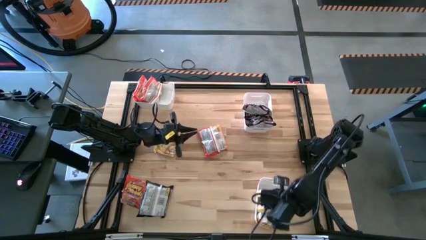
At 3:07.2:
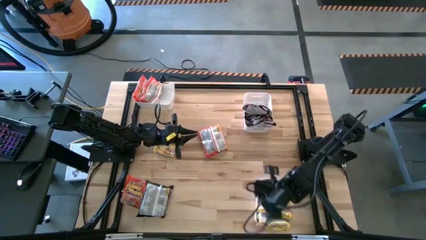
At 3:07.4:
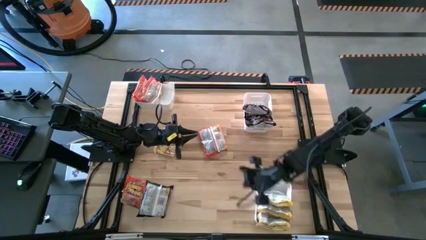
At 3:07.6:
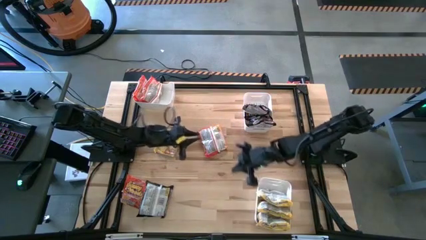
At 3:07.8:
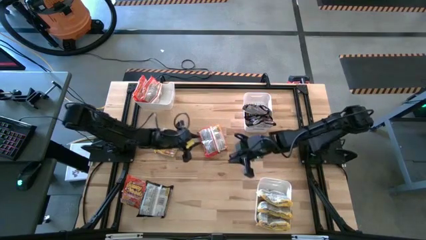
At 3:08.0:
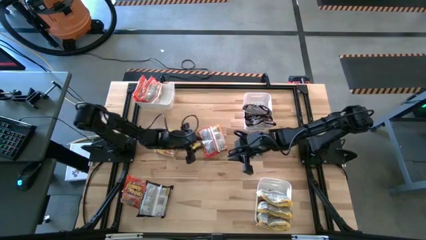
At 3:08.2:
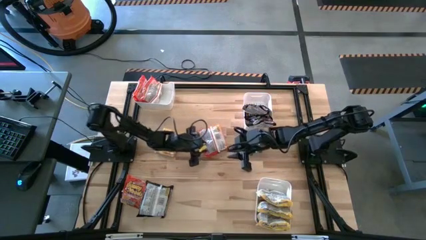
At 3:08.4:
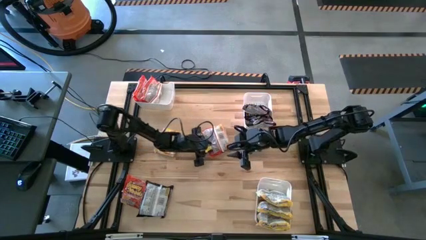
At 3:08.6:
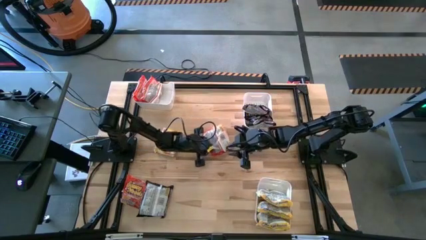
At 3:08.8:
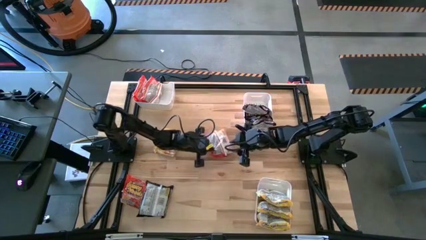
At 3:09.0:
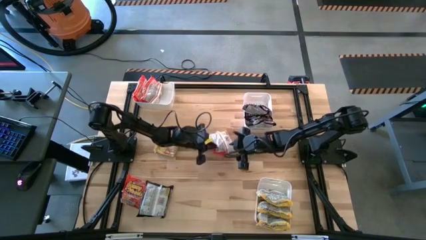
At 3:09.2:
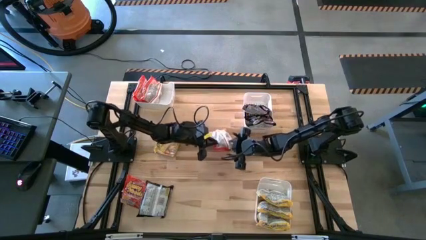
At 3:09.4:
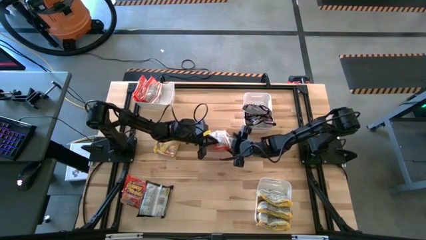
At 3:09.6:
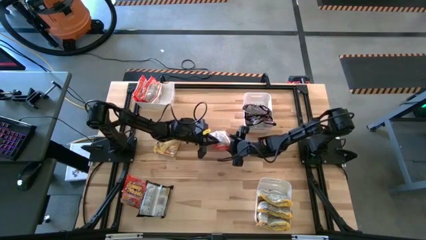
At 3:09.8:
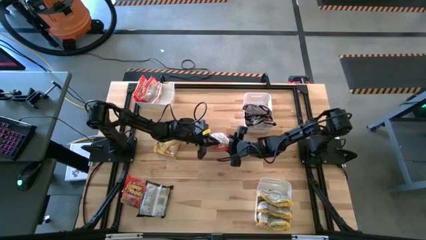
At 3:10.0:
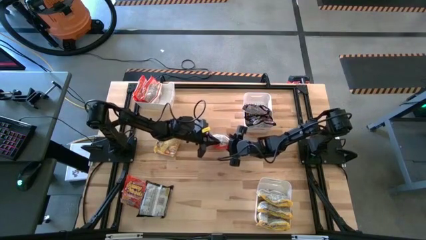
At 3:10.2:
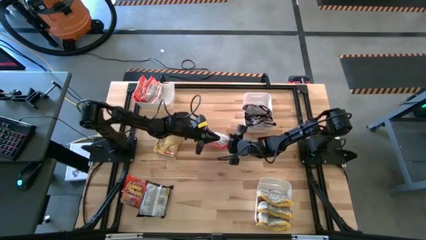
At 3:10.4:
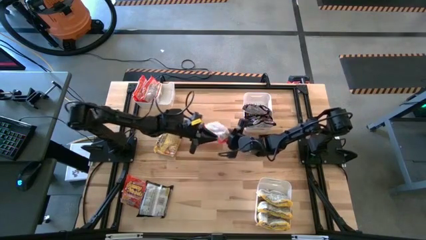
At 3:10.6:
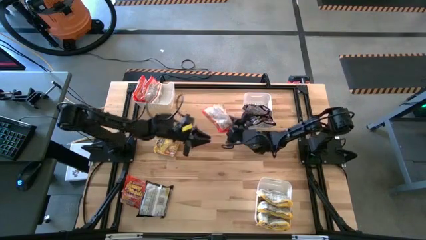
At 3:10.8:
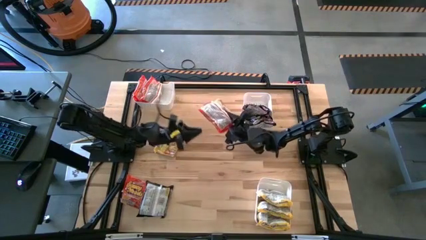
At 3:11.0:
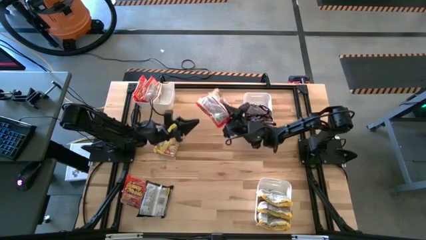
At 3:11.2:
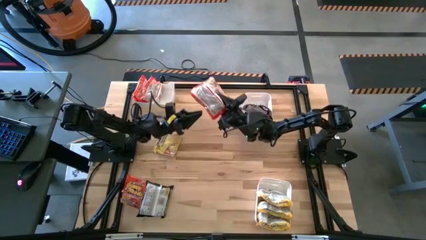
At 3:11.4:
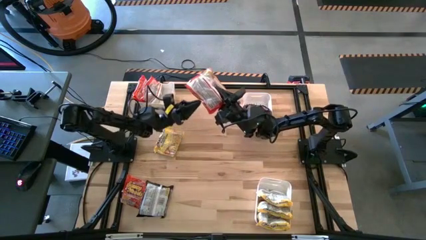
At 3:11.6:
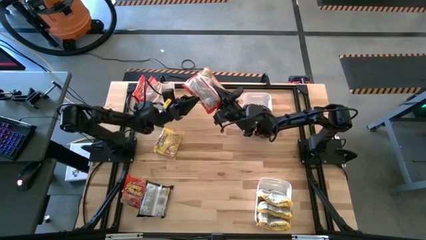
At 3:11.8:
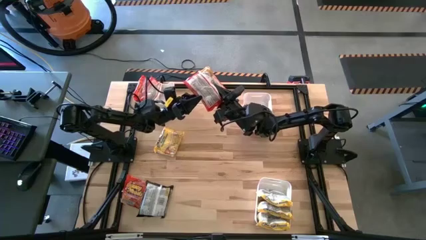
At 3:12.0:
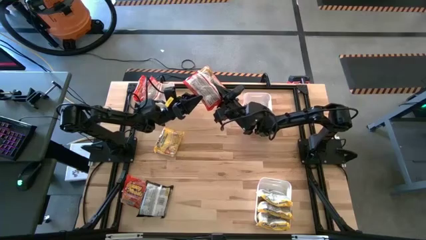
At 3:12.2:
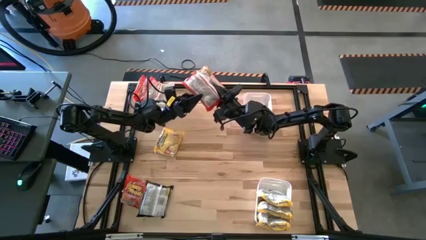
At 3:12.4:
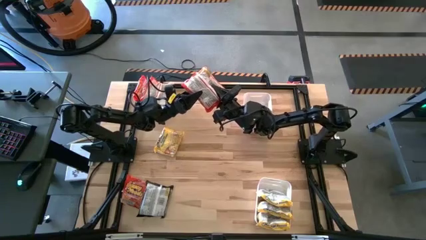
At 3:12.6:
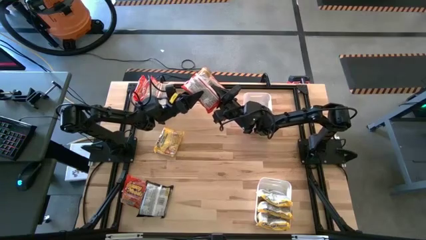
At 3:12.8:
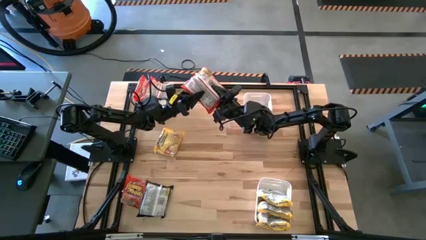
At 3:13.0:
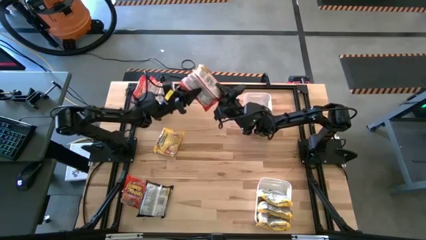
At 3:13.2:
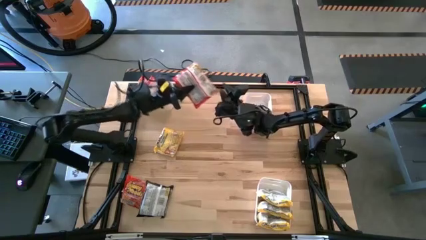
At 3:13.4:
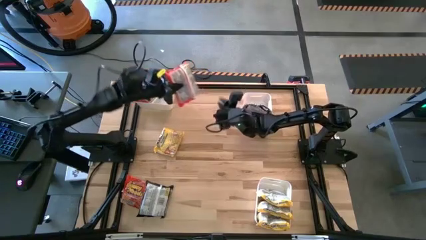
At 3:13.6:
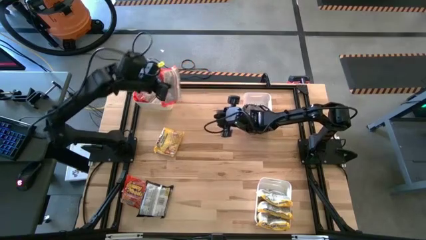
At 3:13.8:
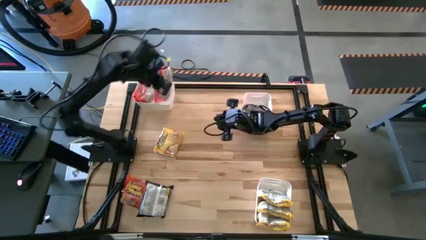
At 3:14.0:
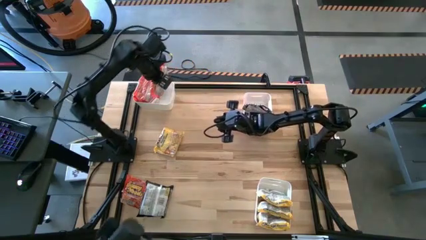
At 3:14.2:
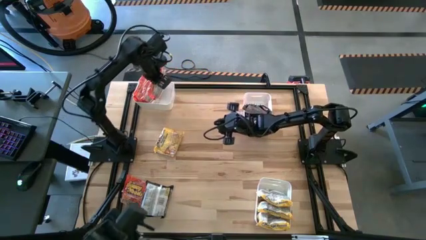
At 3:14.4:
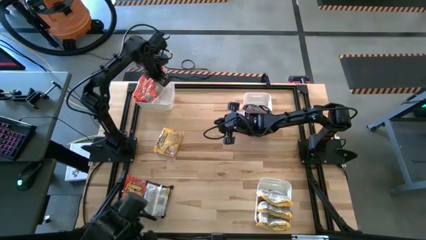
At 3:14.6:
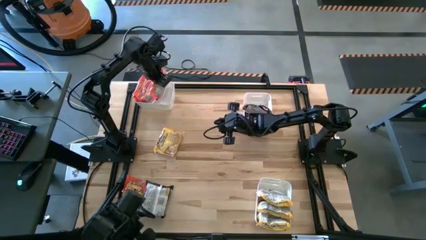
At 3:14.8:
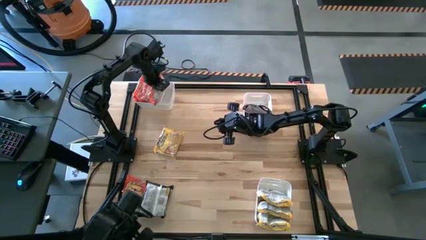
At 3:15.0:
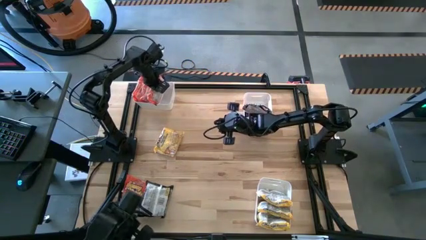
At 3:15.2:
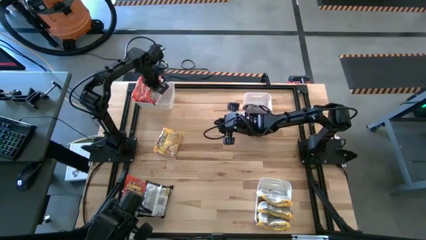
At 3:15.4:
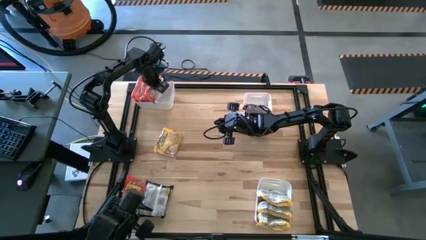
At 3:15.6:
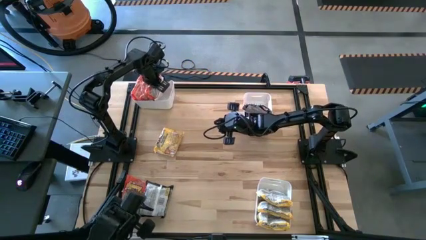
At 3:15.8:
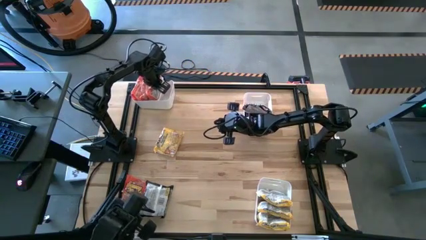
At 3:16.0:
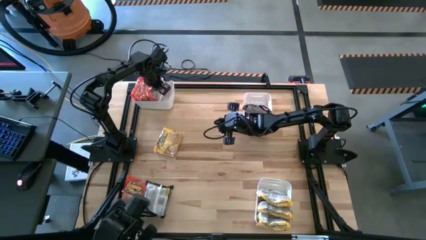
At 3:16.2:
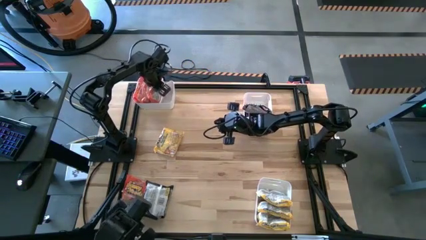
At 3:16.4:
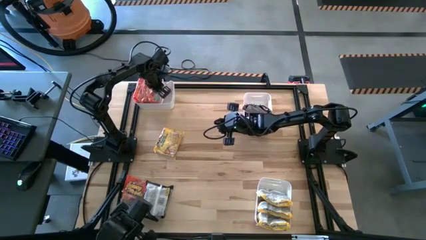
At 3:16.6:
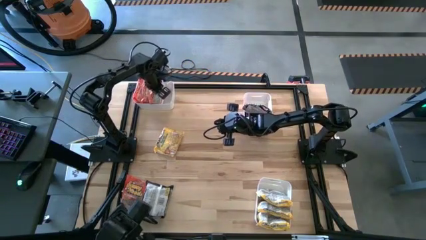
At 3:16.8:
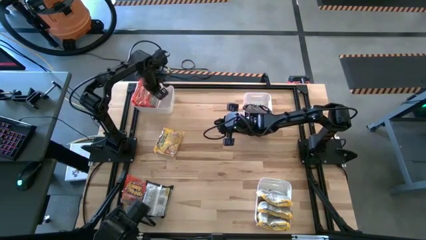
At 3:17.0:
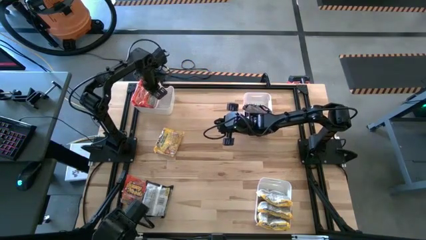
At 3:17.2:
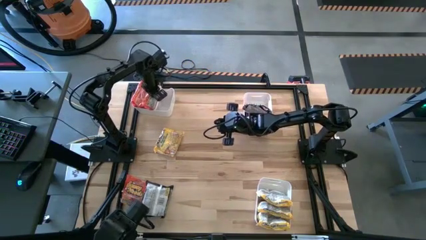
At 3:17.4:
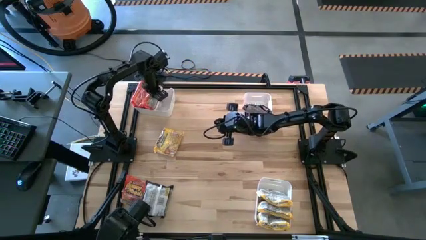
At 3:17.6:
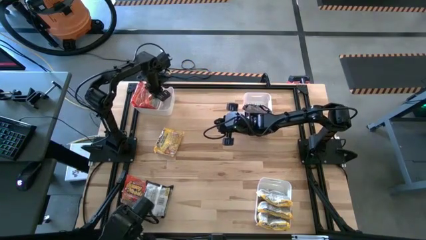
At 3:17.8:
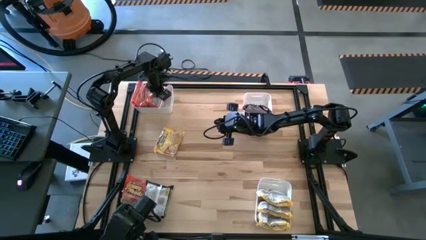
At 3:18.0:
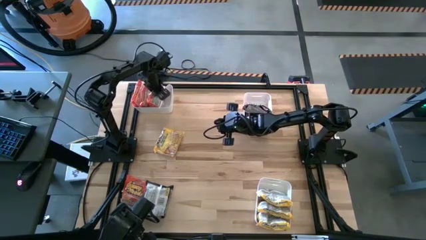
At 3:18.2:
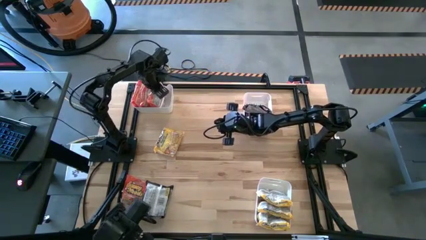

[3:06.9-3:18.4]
Task: Sort Maruchan noodles
Put the orange noodle pack into the top left white bin

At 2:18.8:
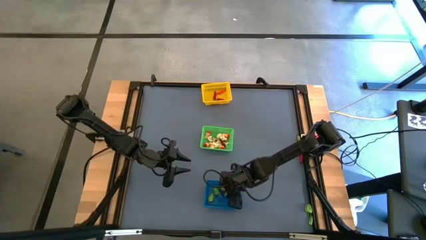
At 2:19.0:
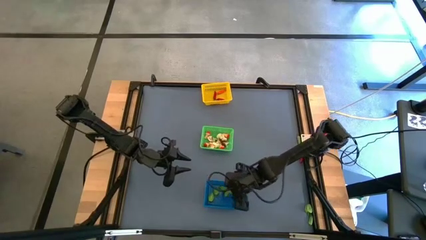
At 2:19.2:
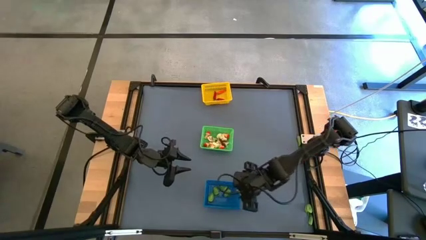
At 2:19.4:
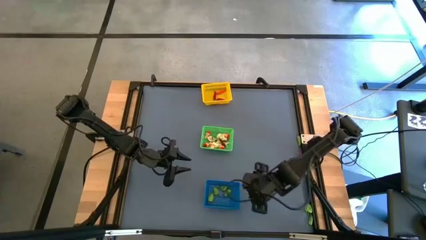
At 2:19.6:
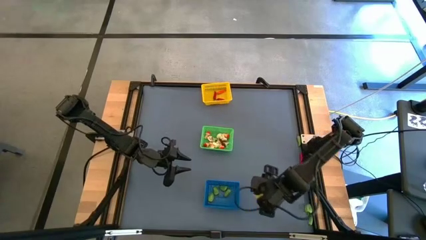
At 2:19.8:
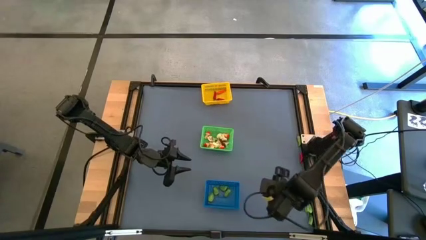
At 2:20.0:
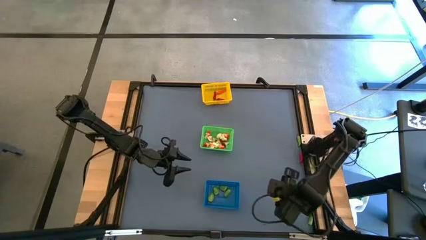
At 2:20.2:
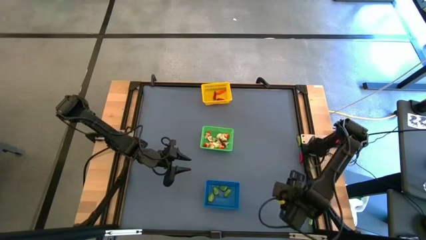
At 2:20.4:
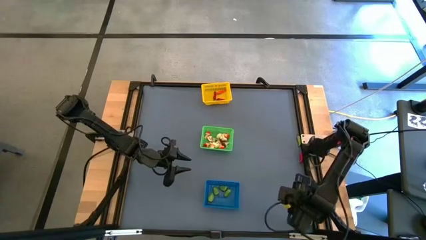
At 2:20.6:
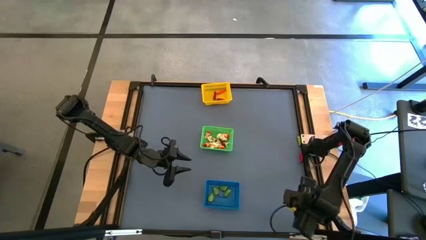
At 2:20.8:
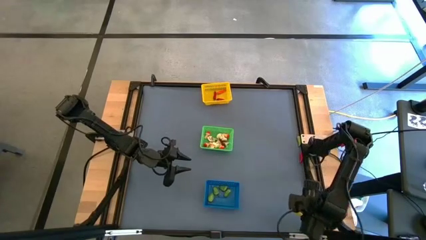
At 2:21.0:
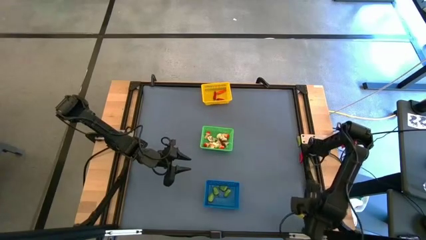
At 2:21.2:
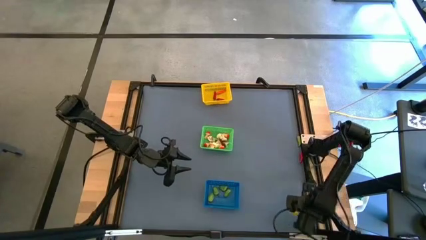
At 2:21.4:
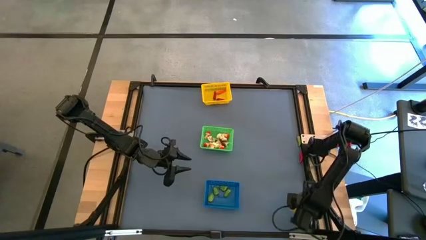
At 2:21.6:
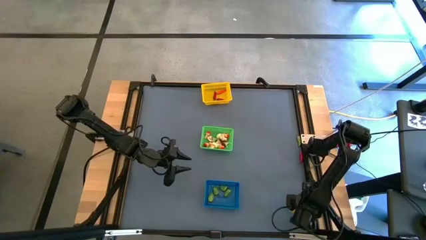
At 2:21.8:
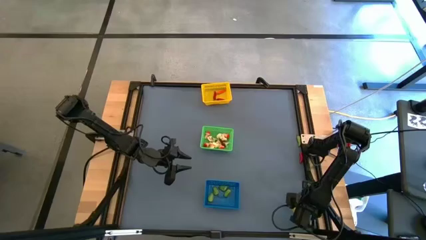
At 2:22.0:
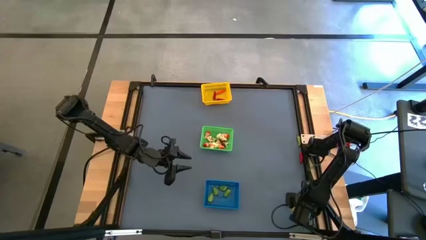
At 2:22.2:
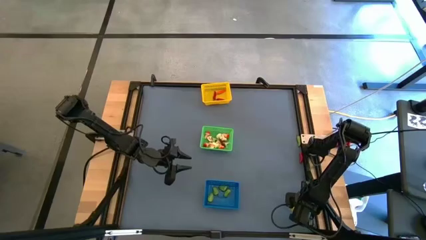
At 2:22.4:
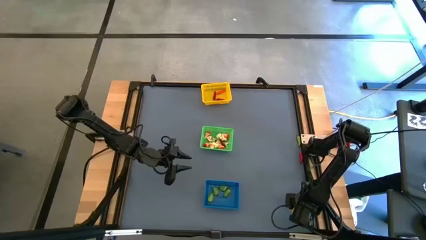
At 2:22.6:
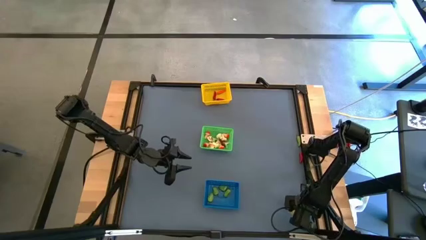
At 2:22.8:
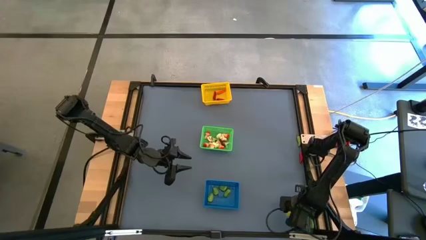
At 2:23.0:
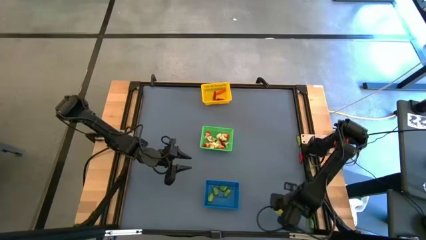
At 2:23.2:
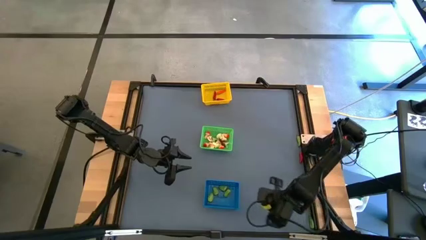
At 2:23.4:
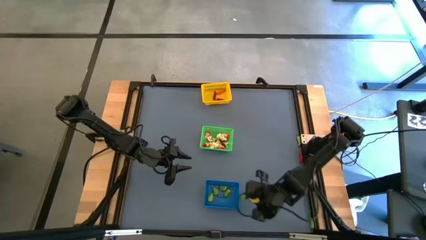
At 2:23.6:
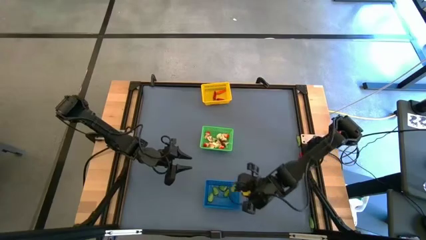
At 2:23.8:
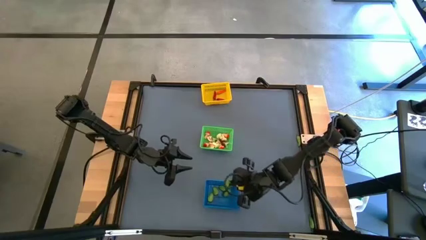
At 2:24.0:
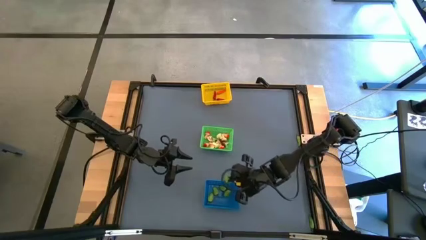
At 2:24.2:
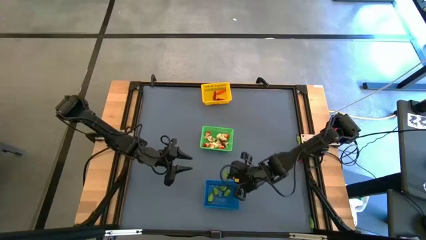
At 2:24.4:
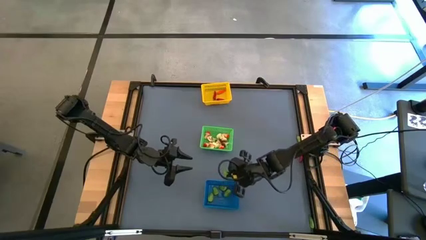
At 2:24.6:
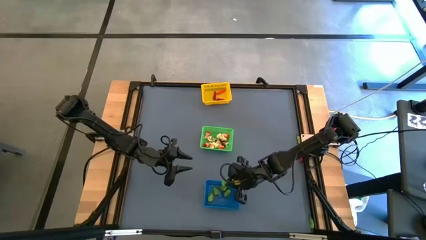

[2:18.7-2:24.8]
Task: Sort produce into baskets
Put the green chili pepper into the blue bin
